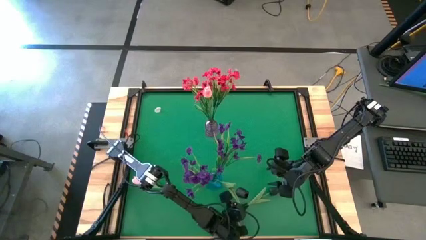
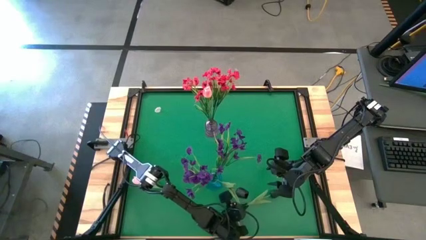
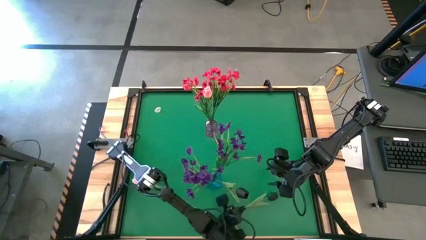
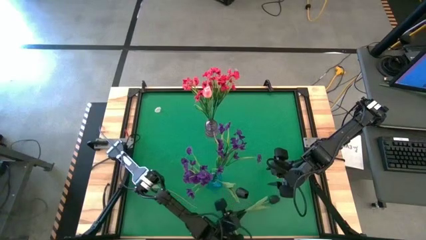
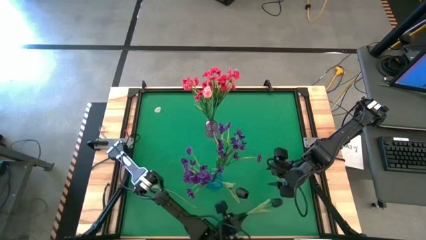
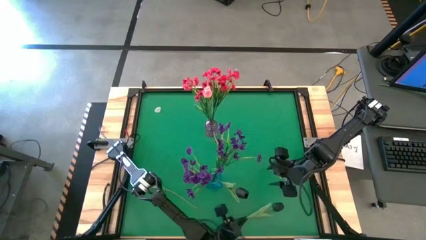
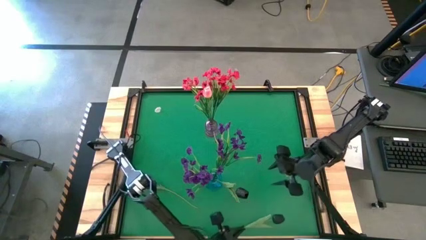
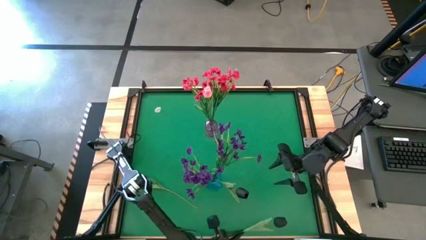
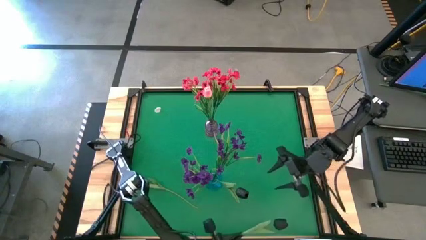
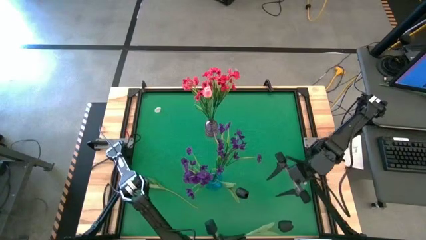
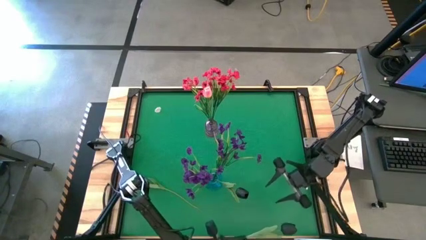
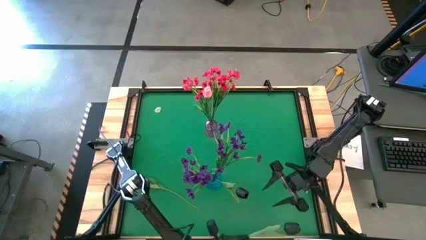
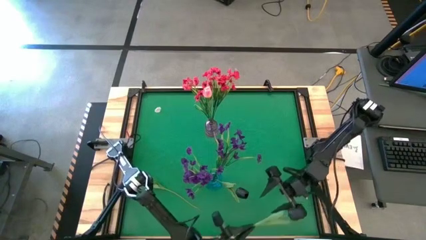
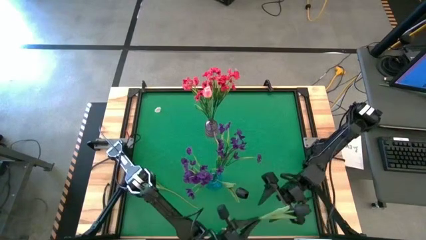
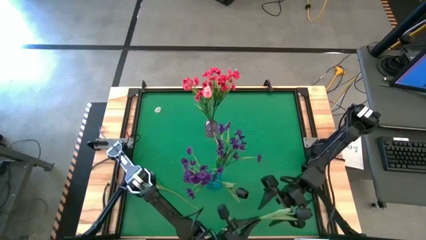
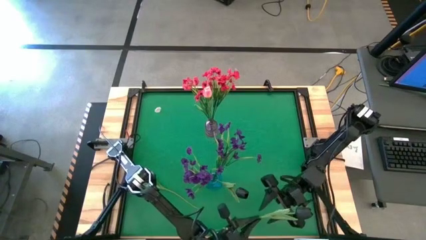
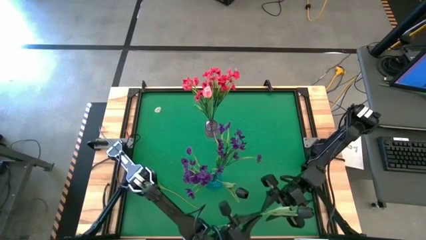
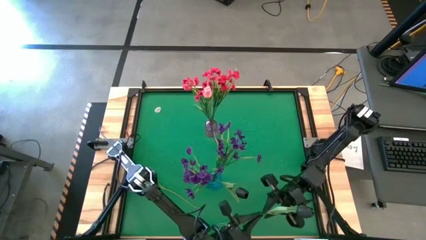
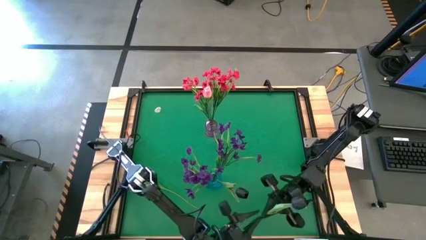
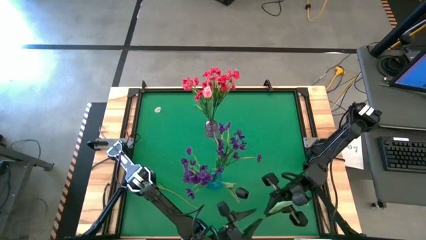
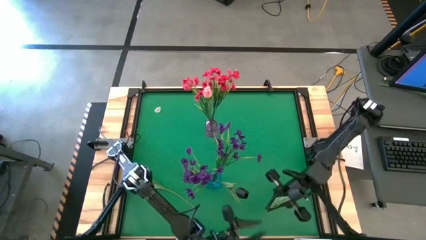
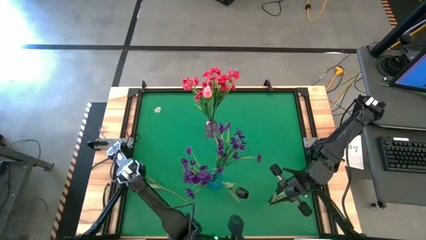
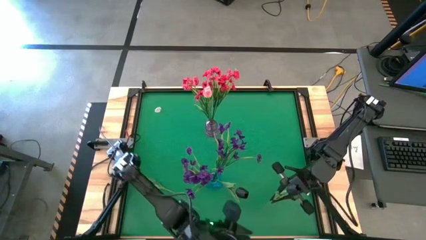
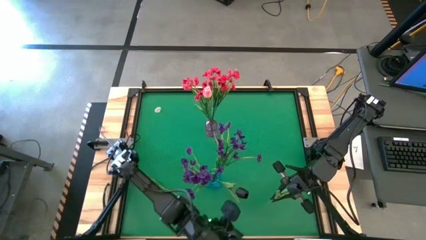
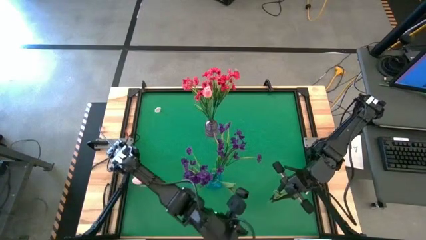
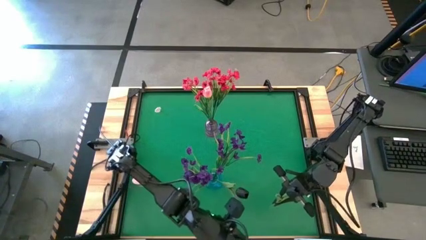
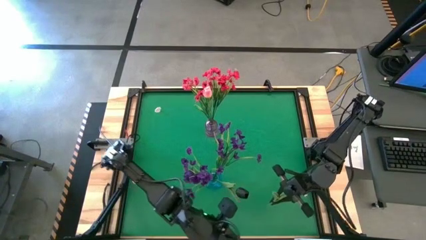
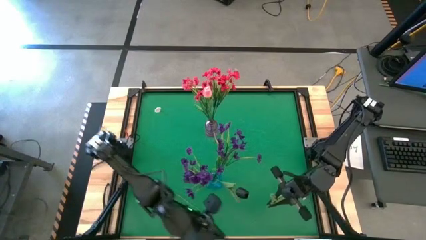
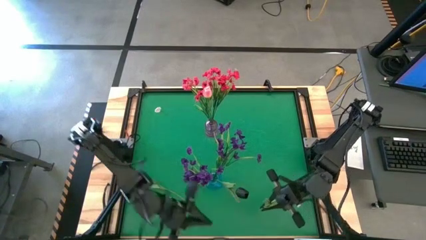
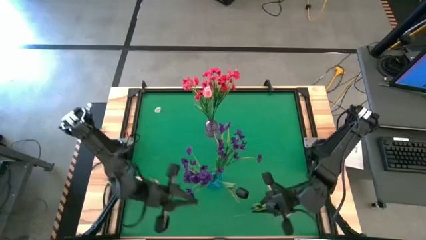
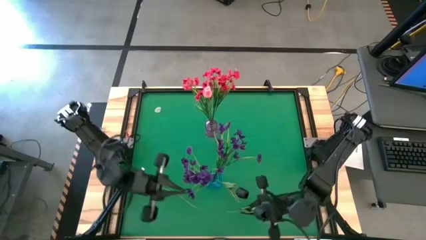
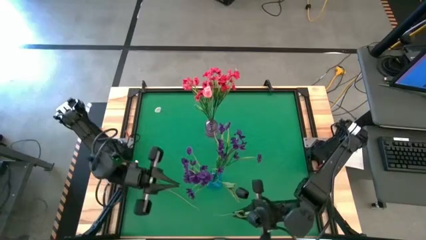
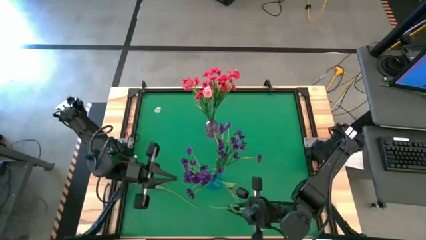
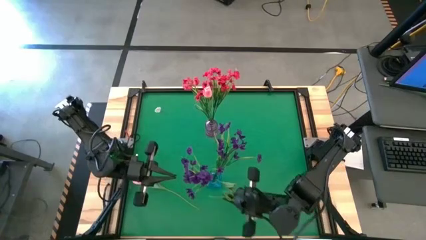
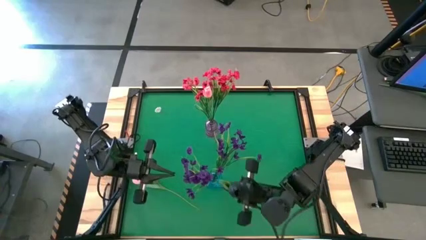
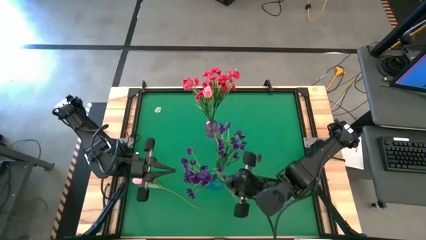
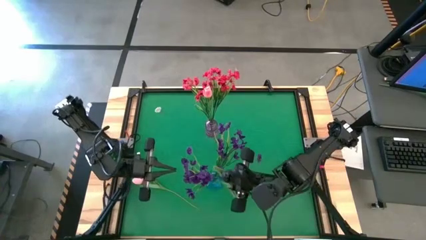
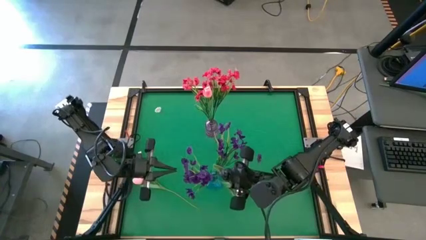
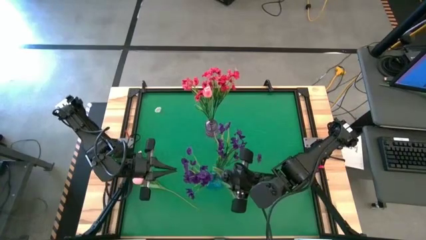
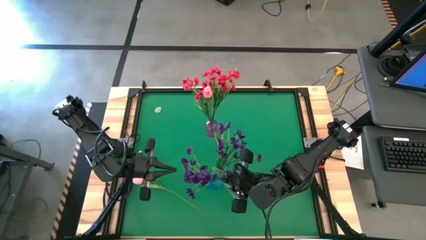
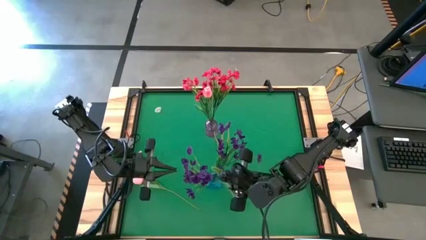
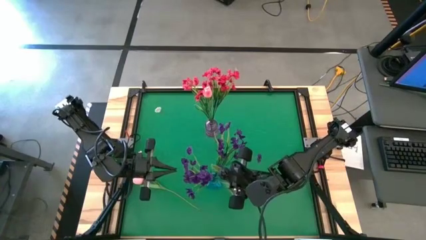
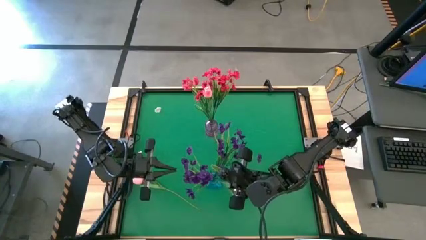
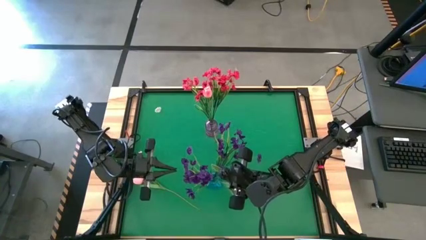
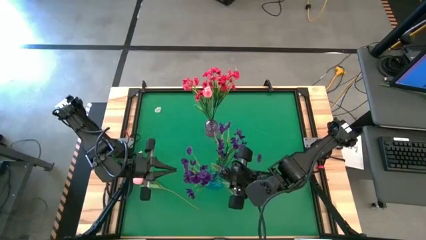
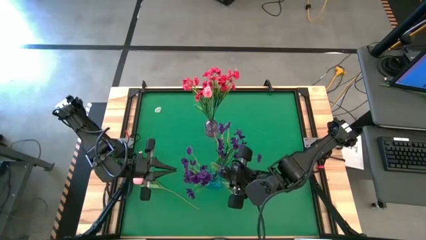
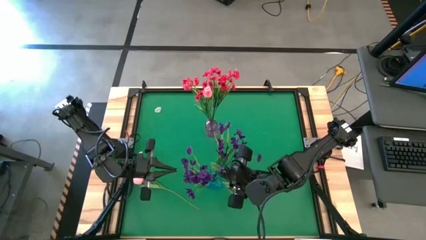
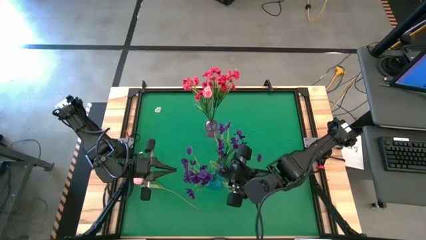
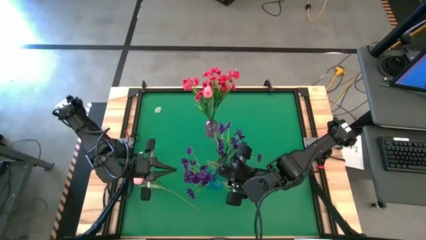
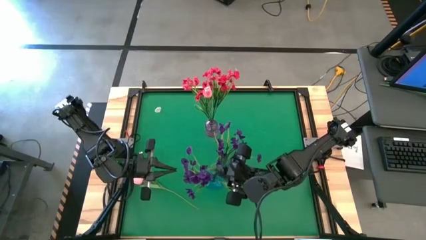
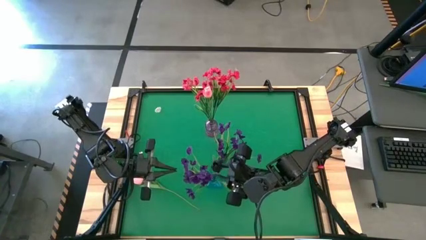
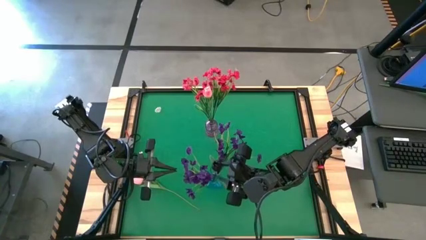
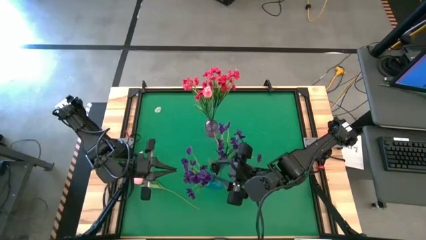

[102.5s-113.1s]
Task: Sort flowers into vase by color
Put the black tulip into the blue vase
